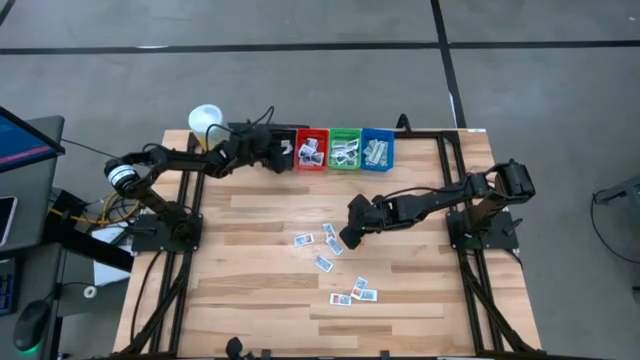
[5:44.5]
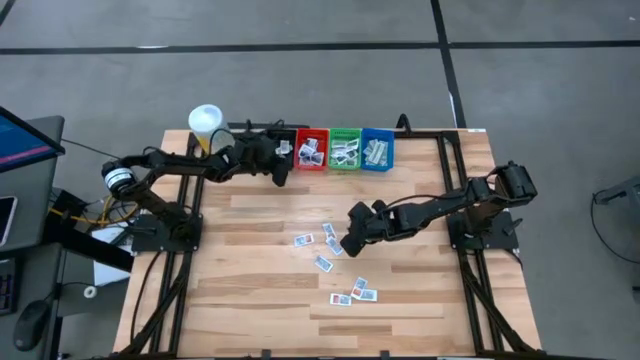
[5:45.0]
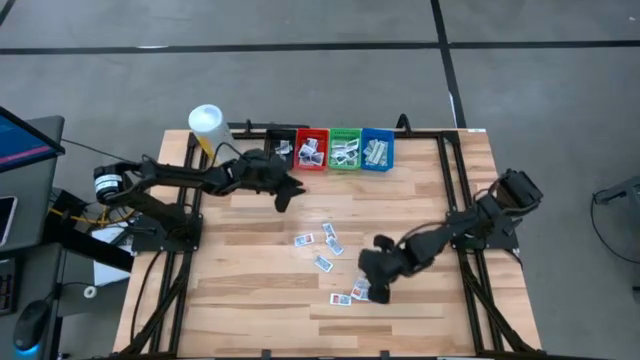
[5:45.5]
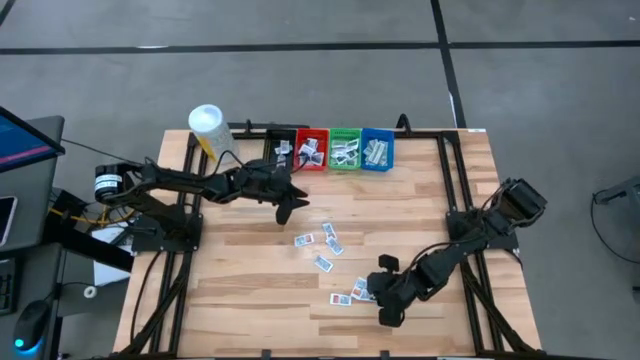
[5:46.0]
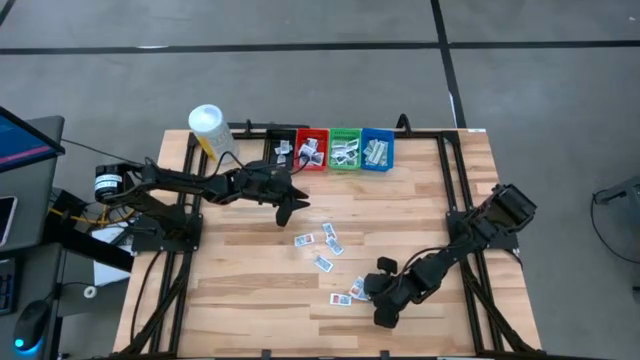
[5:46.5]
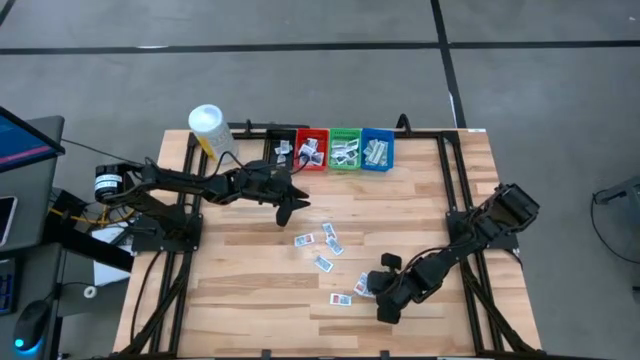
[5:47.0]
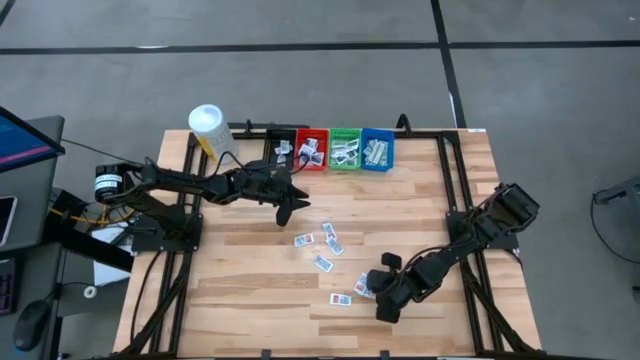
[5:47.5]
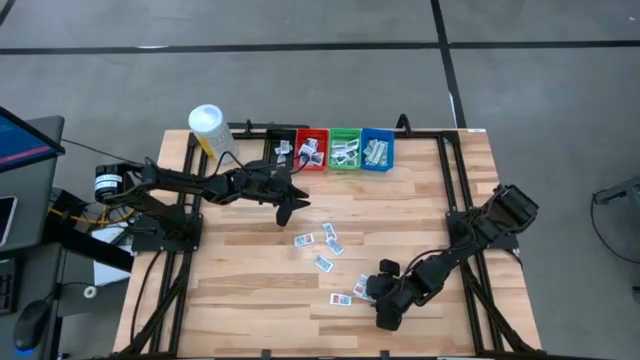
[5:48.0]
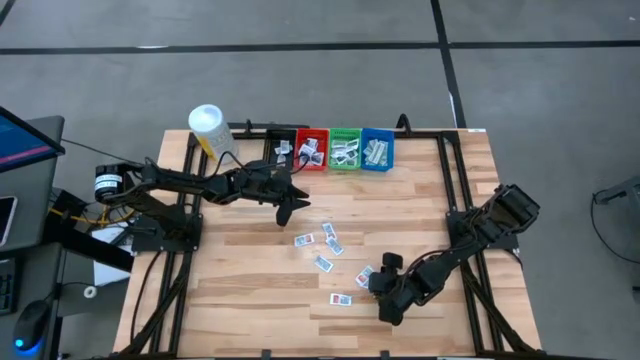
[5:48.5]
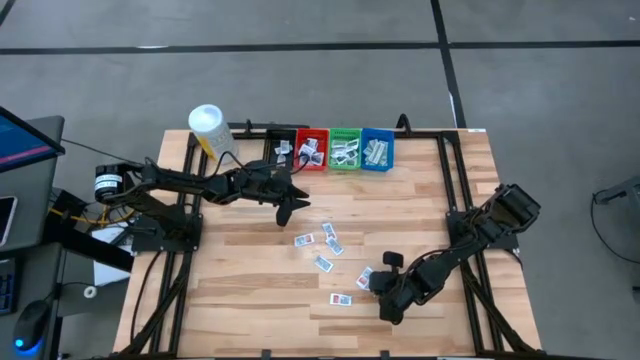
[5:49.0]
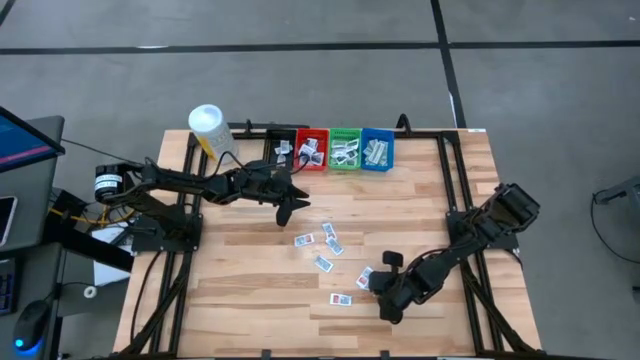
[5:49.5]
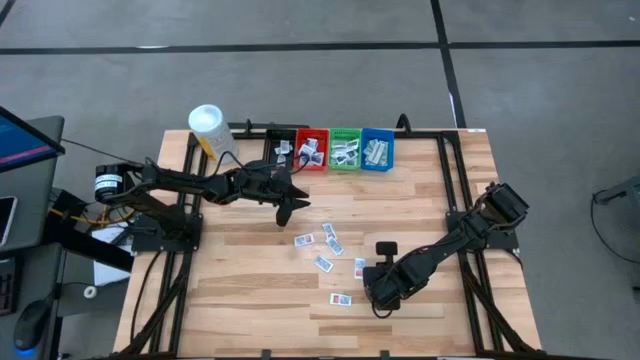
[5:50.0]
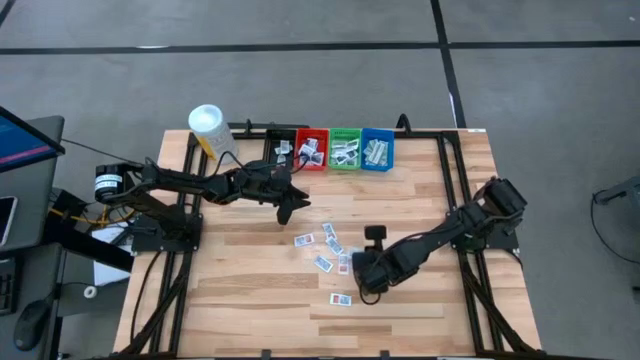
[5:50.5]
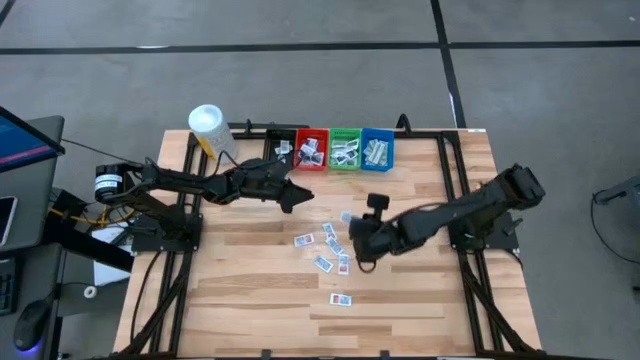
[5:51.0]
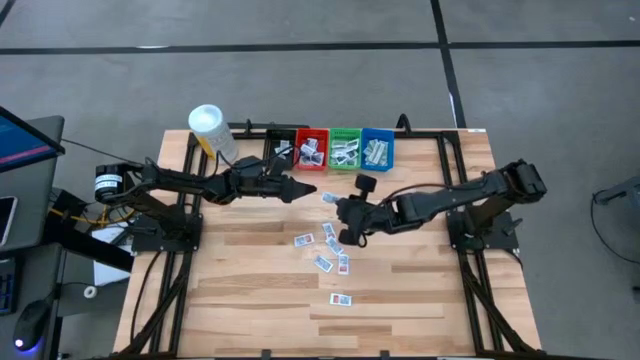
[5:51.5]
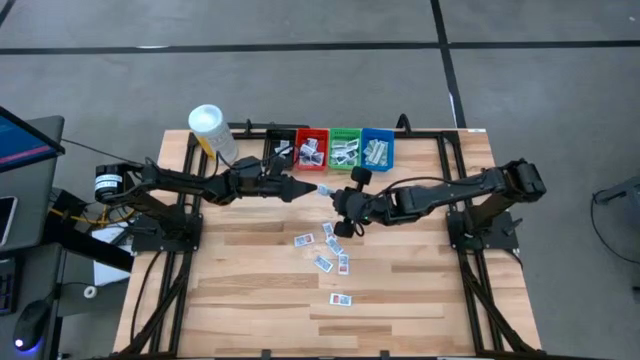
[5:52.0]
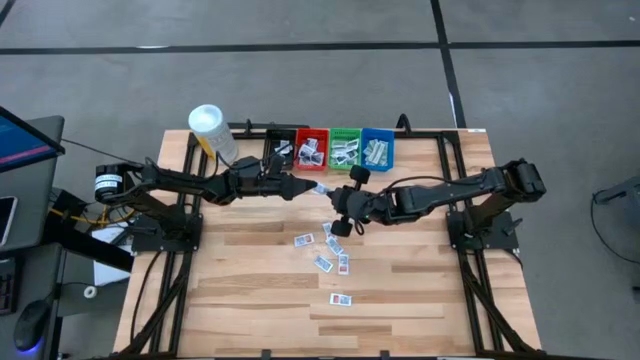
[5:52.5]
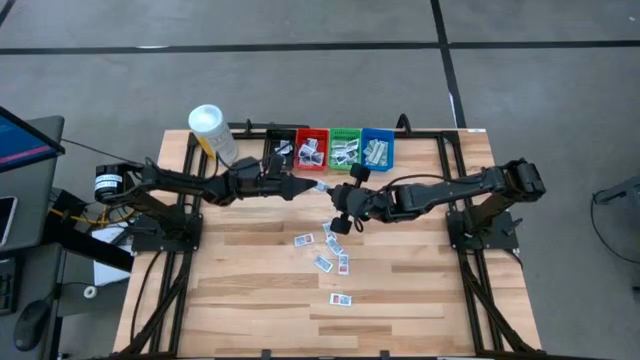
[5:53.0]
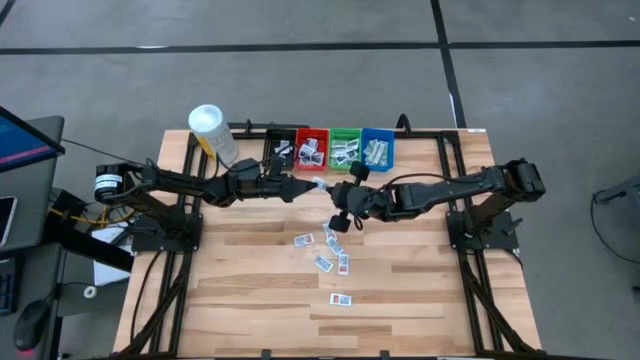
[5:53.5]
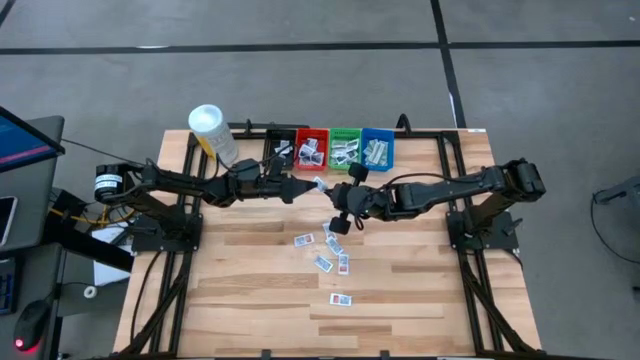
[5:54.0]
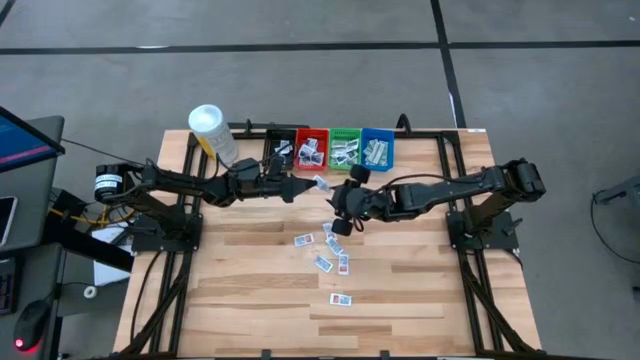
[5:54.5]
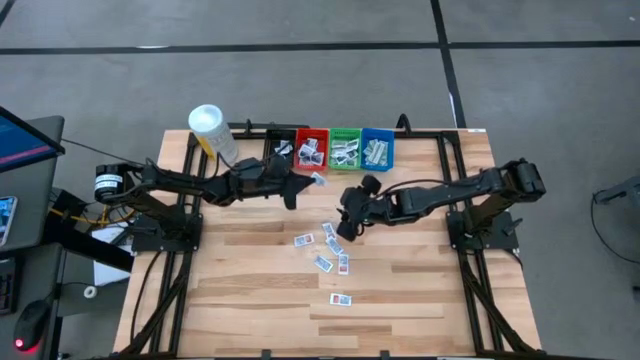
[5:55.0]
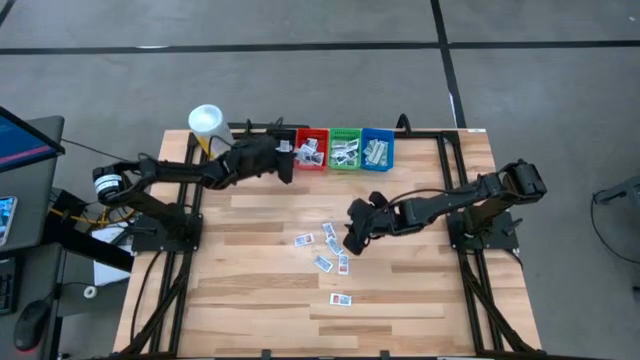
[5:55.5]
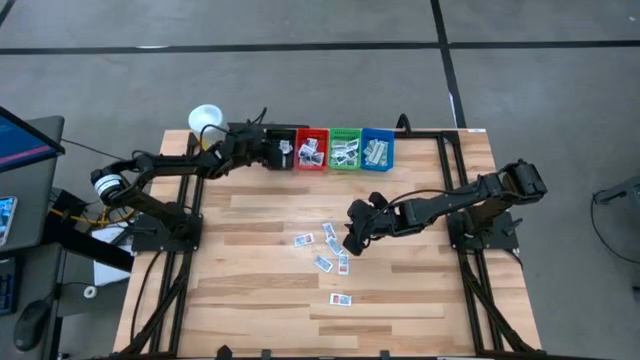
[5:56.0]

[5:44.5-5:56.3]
Task: Pick & Place First Aid Supplies
Put the ointment pack into the black bin

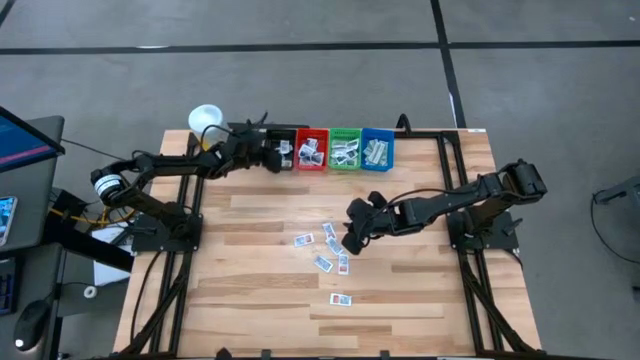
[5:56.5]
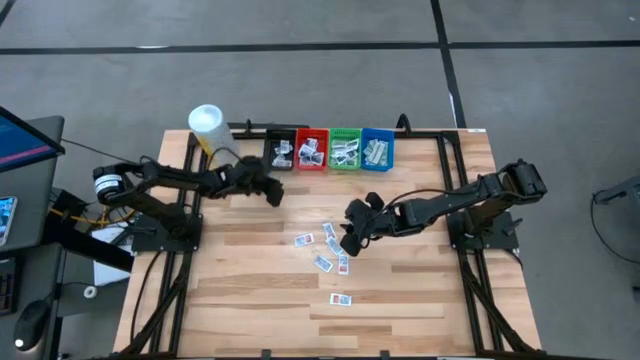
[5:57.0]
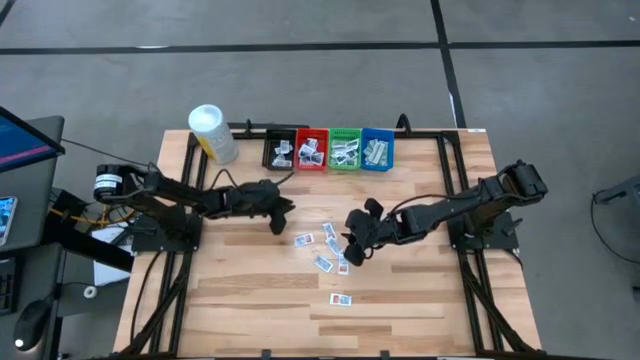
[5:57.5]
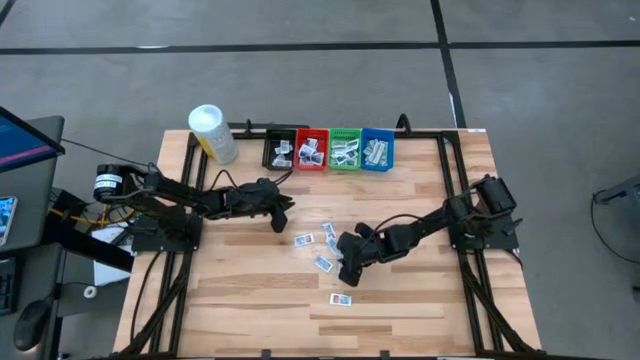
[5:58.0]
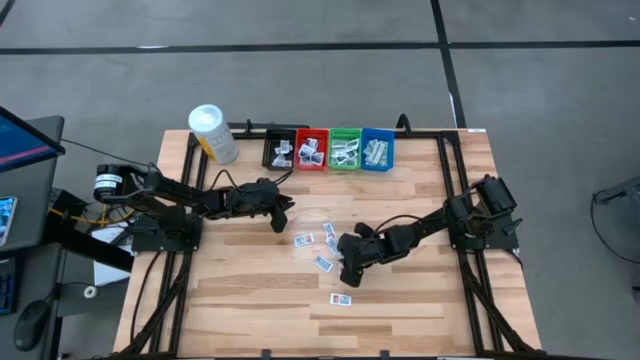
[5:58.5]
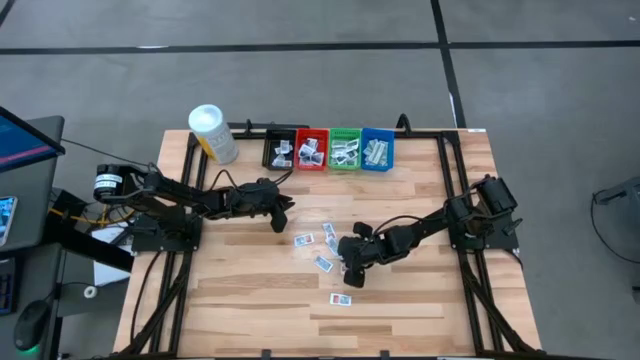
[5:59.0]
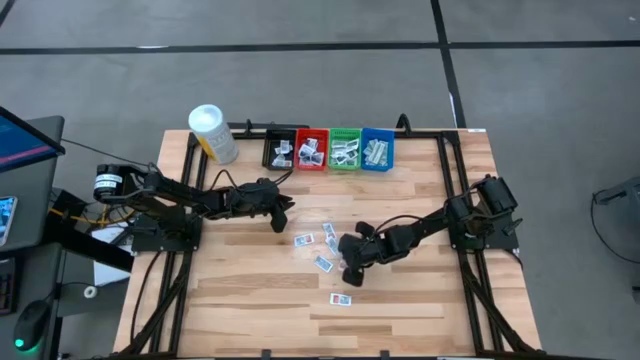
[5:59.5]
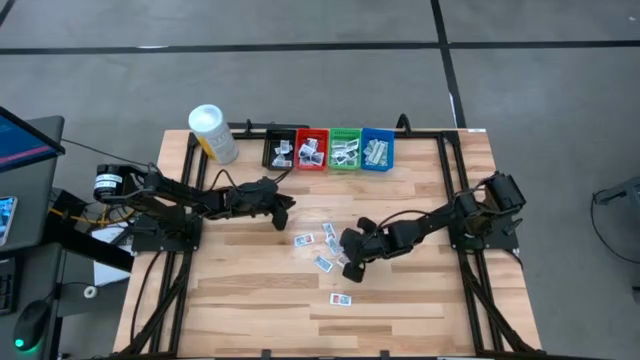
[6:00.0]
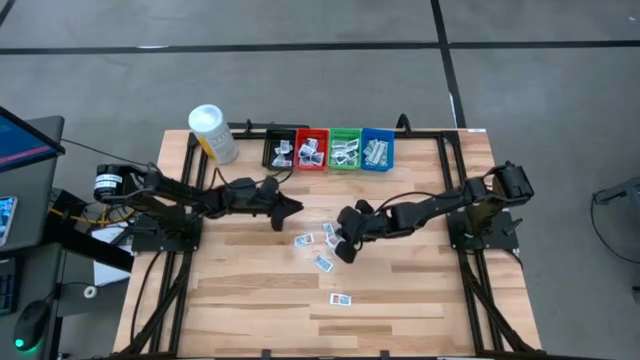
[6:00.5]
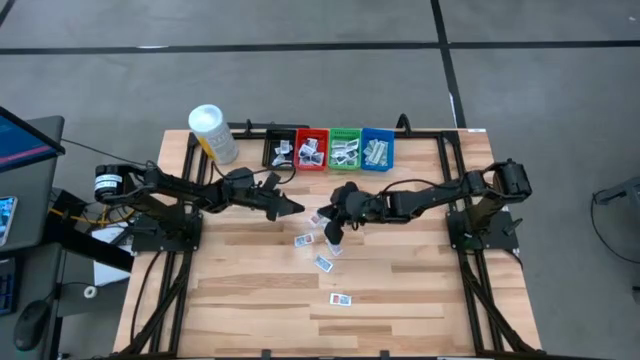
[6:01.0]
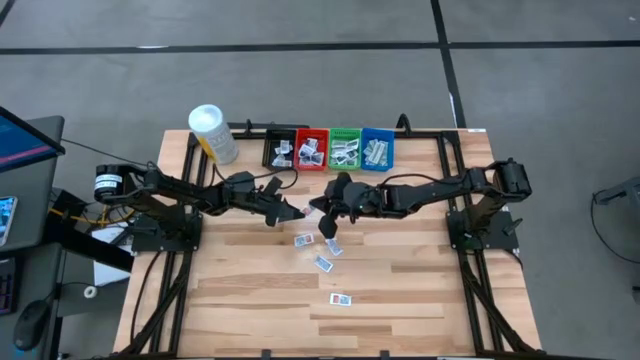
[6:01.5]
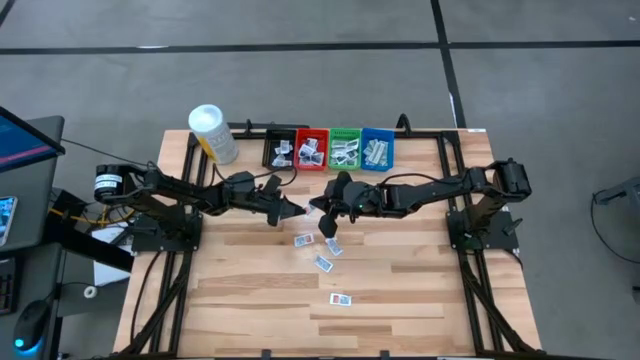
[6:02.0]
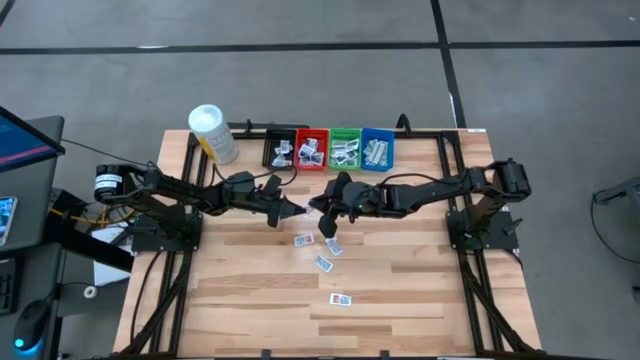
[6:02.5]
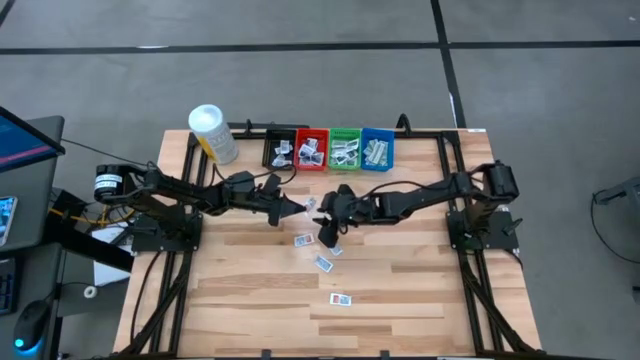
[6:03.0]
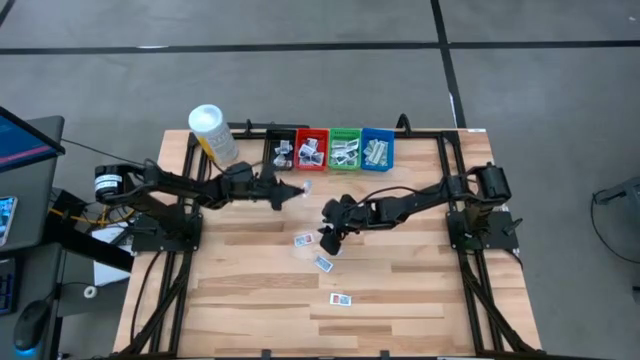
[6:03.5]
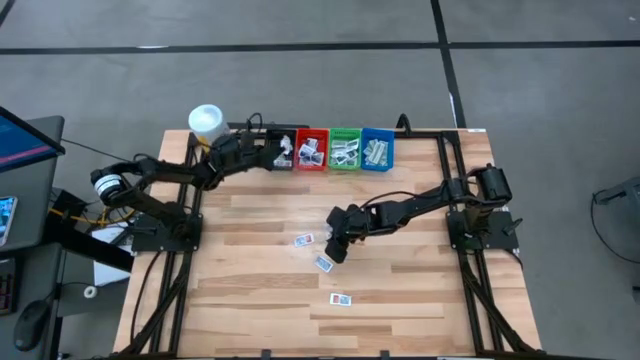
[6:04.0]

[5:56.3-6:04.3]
Put the ointment pack into the black bin

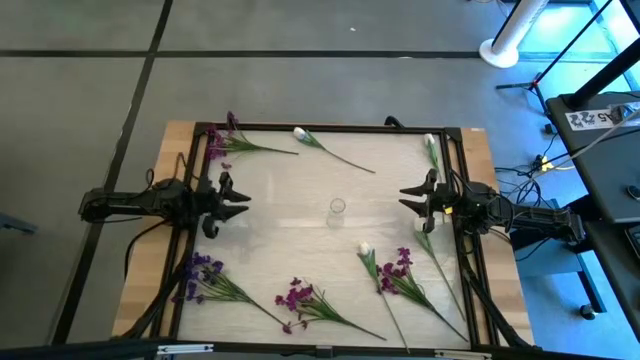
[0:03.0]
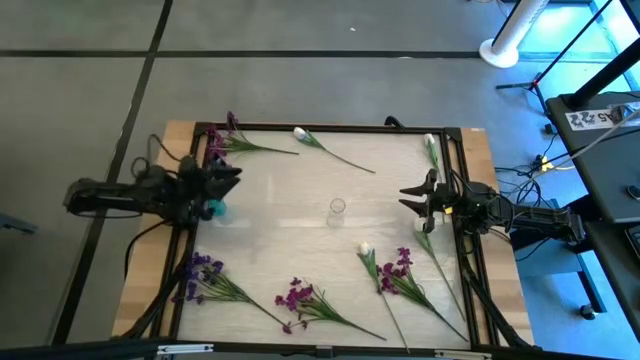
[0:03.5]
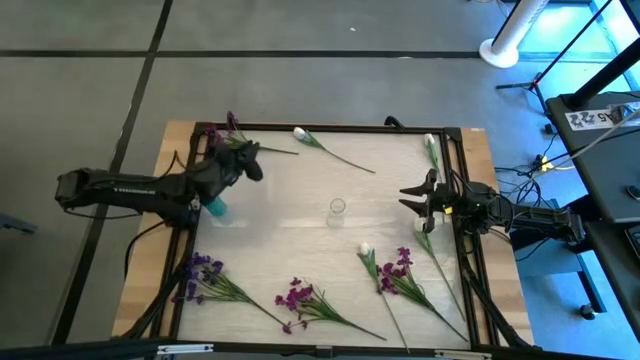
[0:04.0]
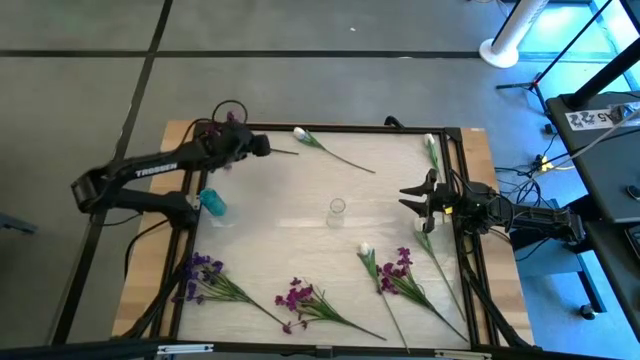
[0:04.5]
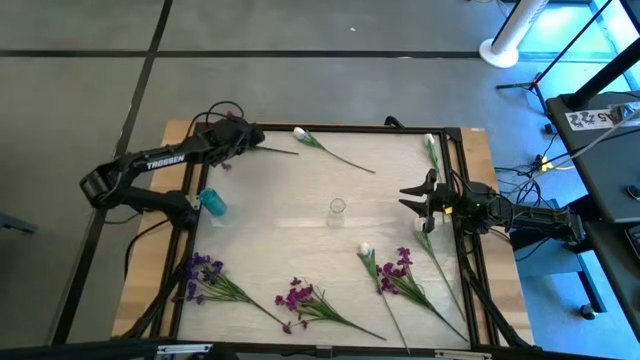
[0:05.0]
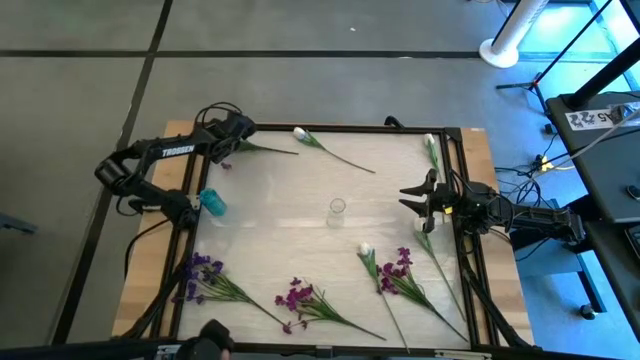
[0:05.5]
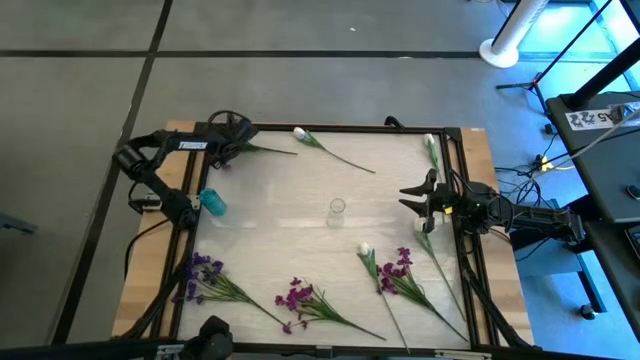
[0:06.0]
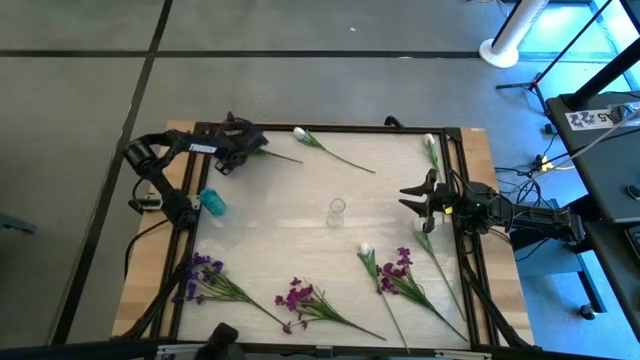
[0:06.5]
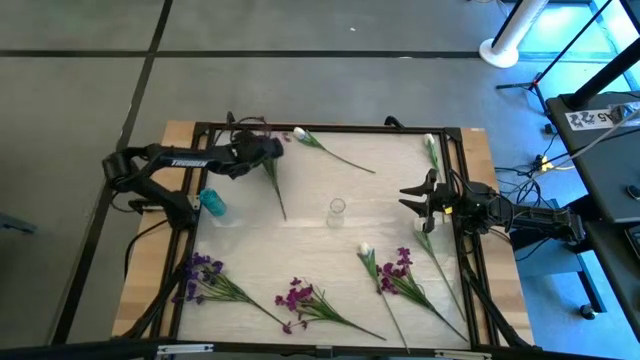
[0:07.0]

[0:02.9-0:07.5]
Task: Sort flowers into vase by color
Put the top purple flowers into the blue flower vase
